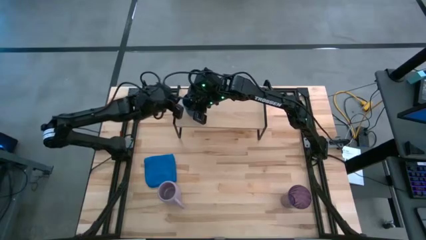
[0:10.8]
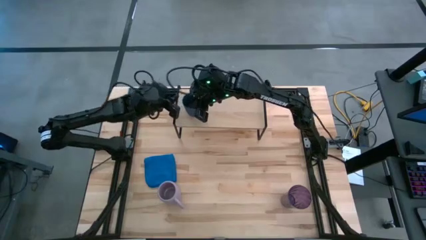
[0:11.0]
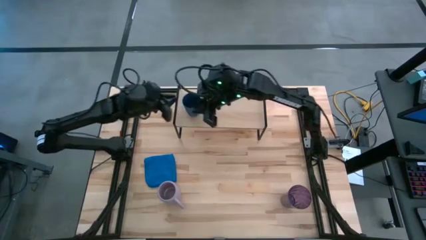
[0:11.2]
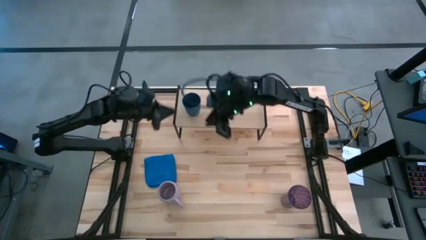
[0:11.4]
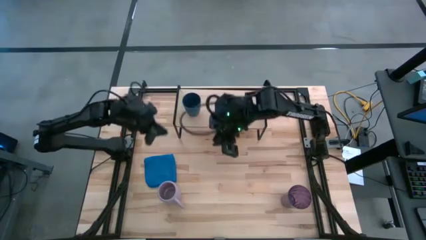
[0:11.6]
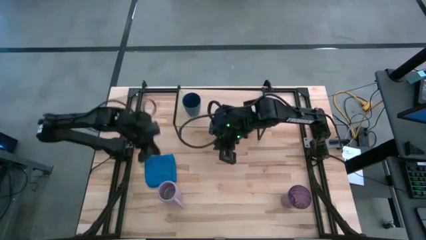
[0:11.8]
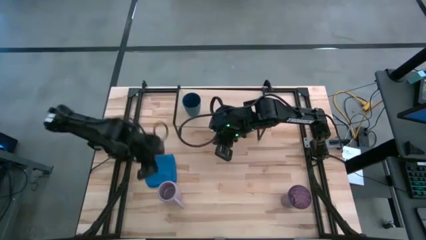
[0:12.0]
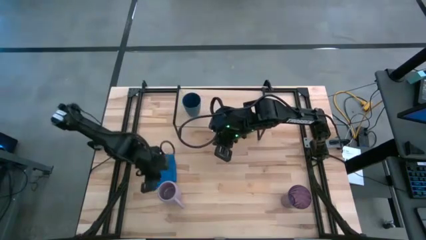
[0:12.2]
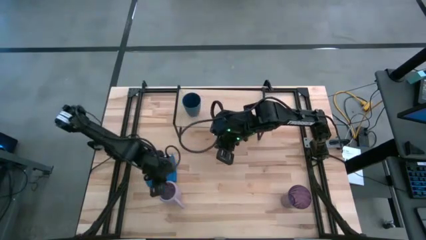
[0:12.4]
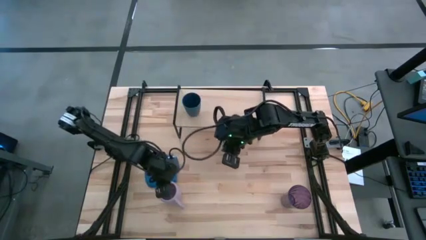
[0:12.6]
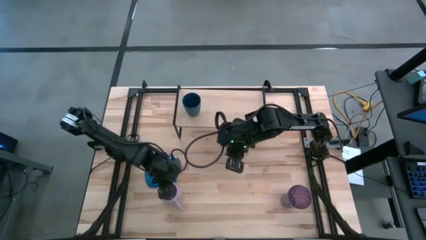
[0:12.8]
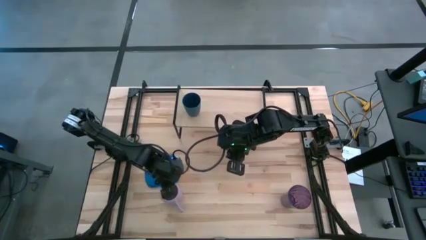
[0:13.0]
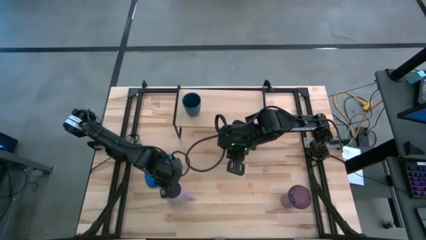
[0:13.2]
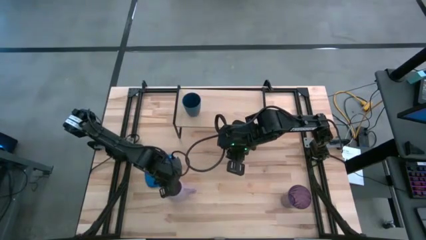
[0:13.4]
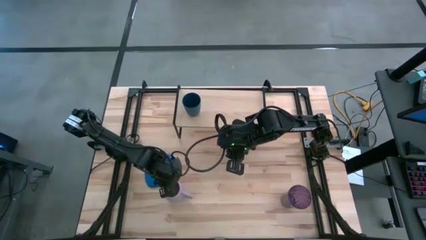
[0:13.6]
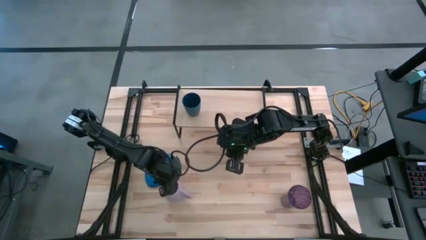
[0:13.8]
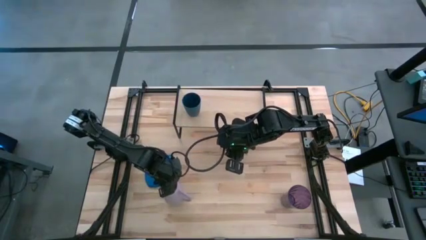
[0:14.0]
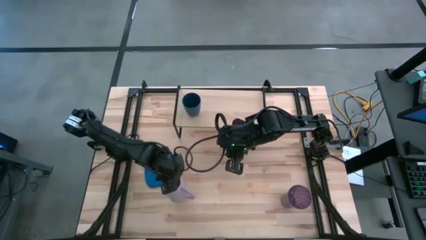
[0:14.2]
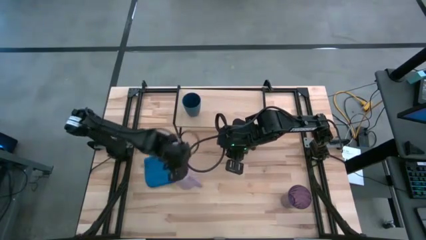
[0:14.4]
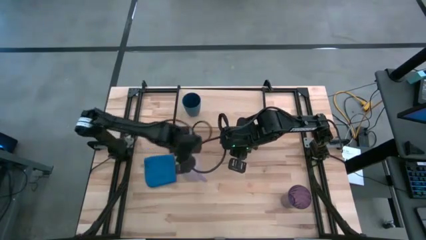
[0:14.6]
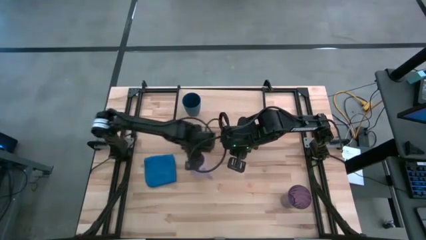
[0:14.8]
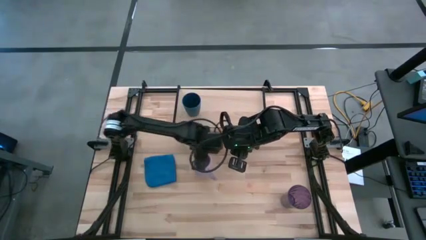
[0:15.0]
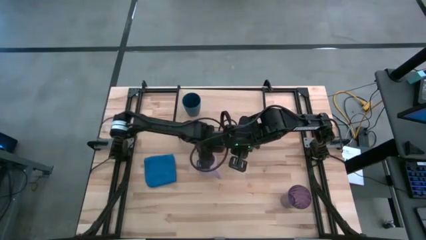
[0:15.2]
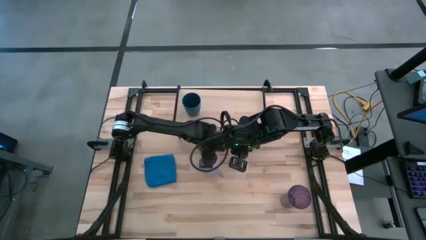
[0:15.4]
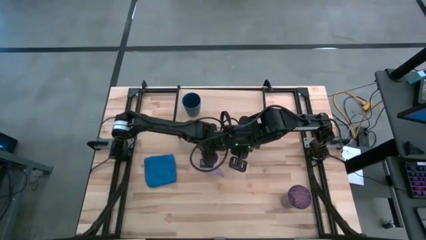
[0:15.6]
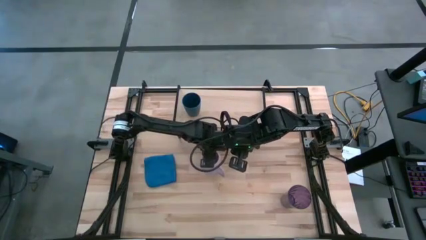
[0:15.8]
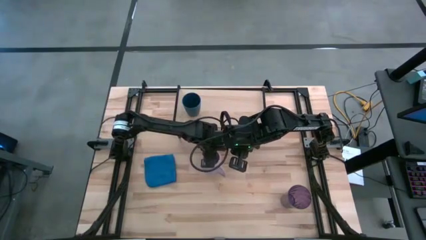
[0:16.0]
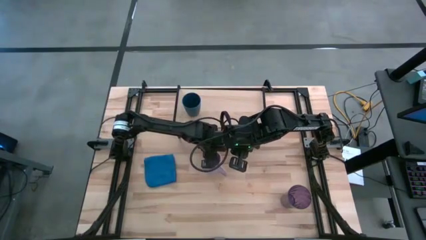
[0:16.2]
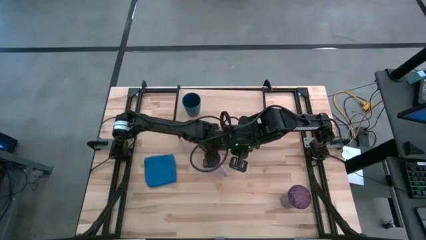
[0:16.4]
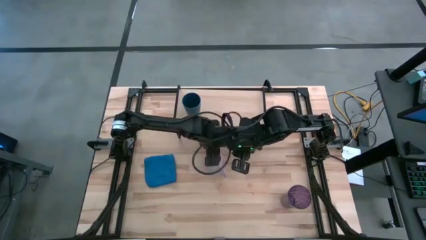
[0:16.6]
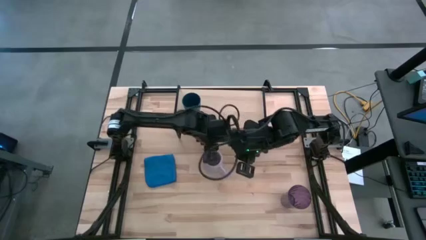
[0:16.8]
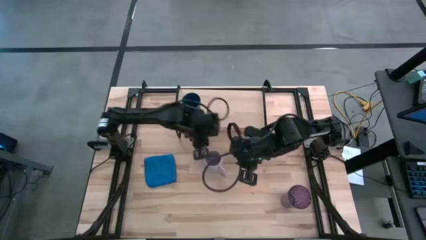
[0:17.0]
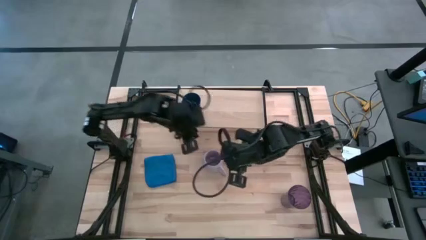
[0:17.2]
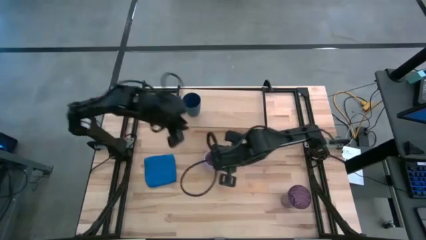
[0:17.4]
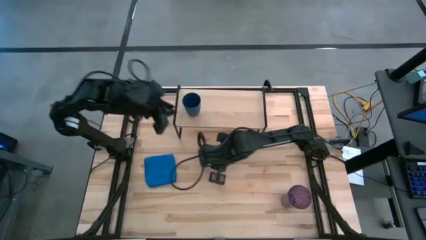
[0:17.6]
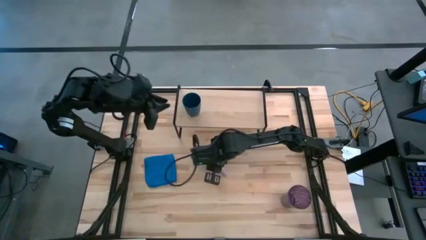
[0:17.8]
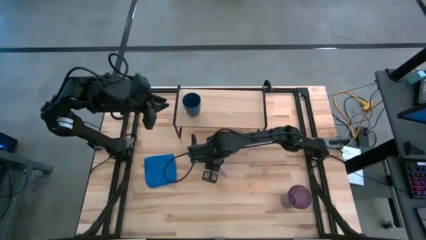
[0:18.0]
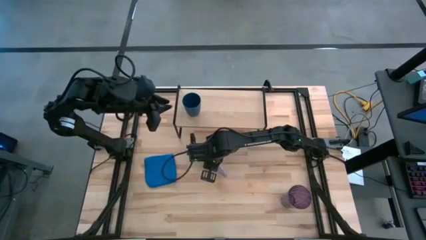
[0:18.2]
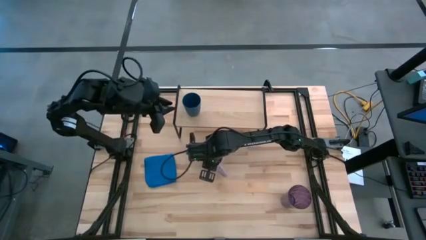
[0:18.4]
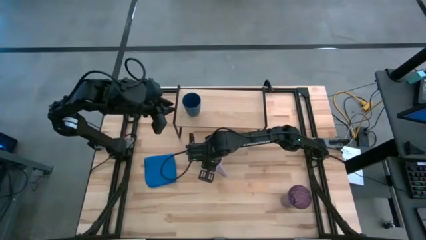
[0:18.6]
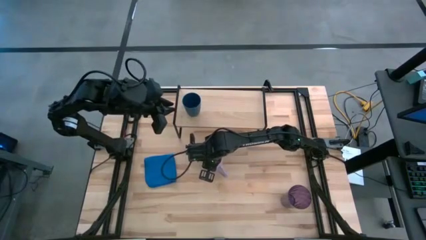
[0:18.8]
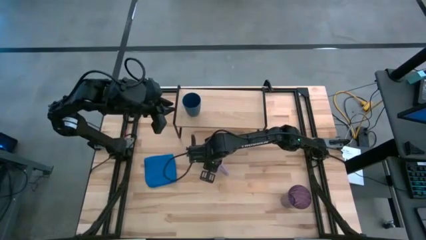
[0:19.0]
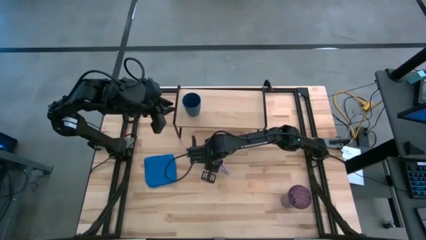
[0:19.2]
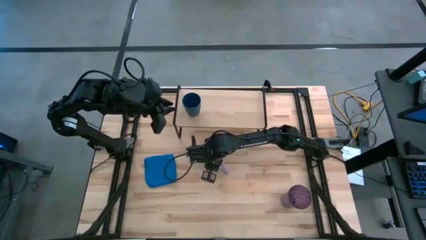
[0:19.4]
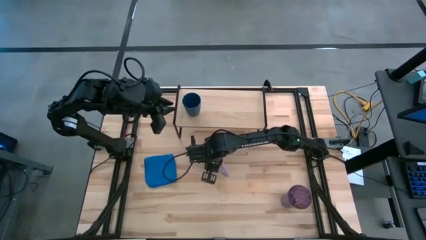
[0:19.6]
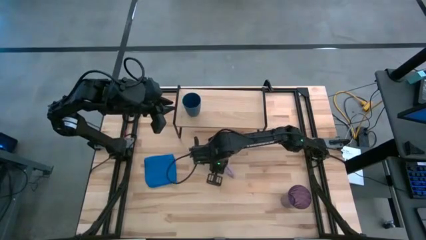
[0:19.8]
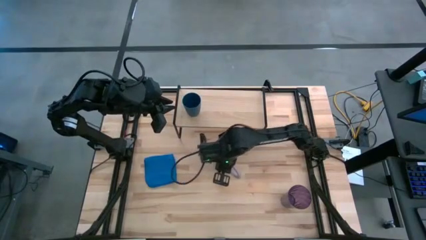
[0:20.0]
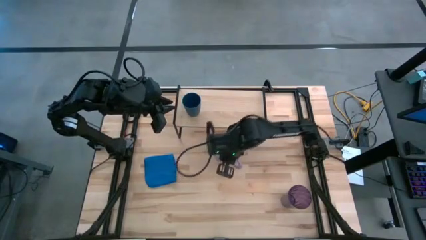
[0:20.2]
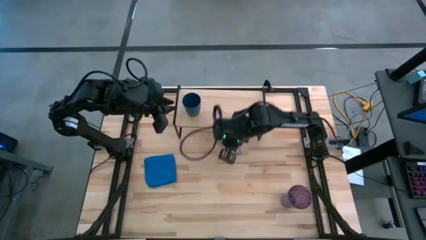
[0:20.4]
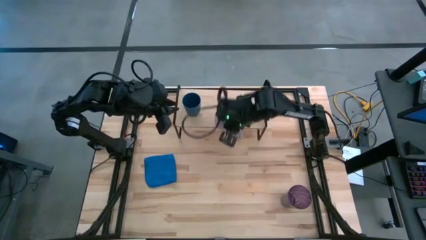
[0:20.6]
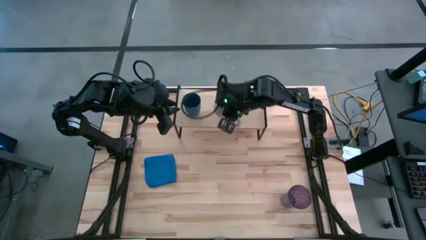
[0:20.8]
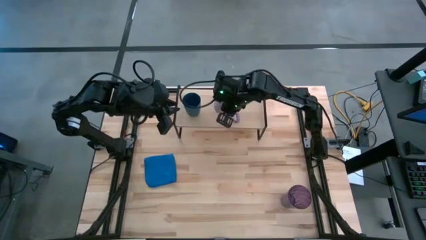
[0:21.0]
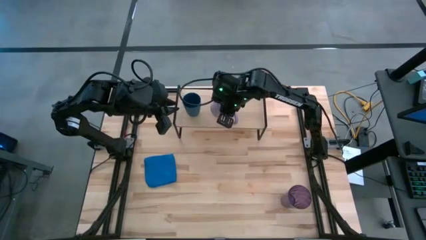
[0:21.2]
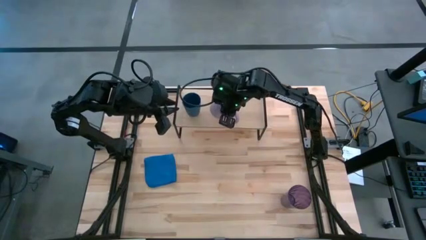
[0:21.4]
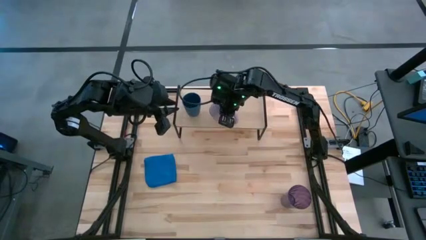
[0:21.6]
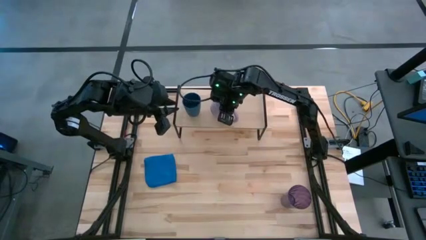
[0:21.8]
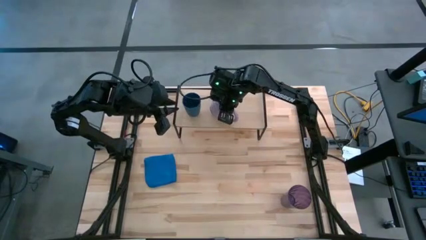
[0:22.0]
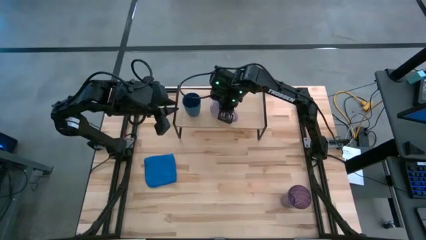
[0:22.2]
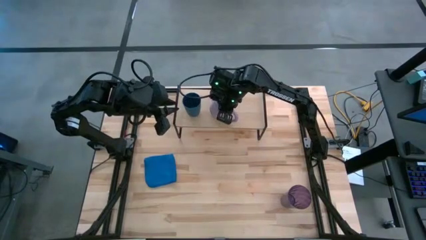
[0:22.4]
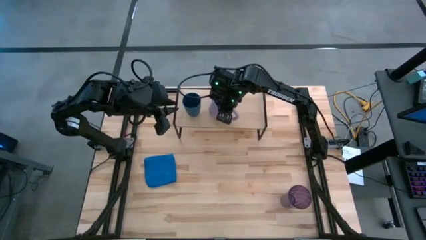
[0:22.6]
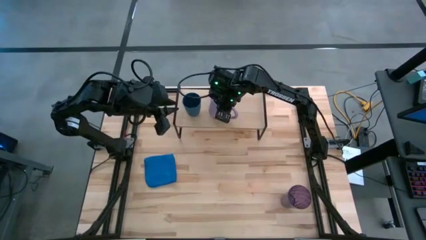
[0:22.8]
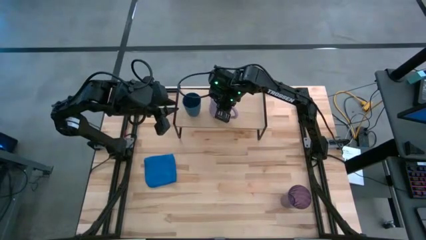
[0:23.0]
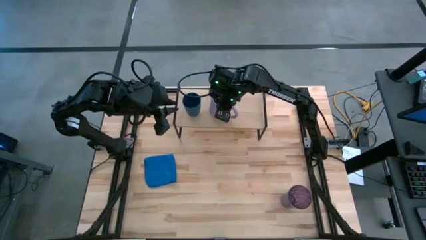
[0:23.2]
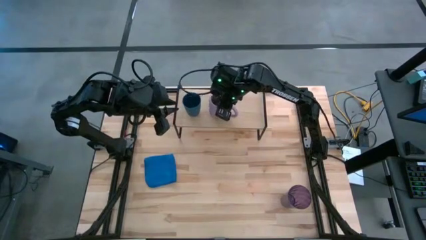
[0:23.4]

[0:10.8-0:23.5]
Task: Stack small to large cups/mugs on shelf
Put the light purple mug on the shelf

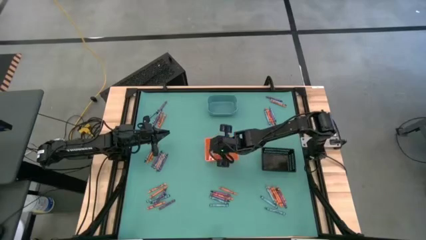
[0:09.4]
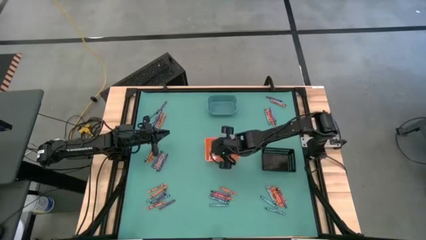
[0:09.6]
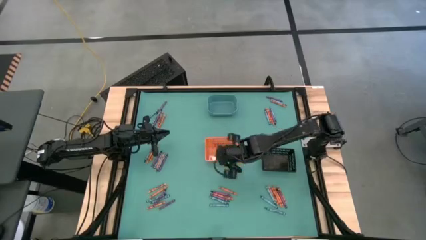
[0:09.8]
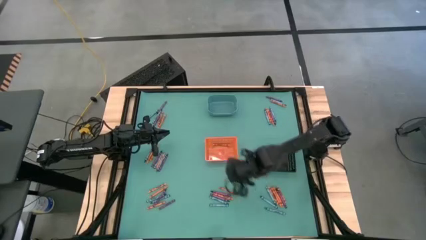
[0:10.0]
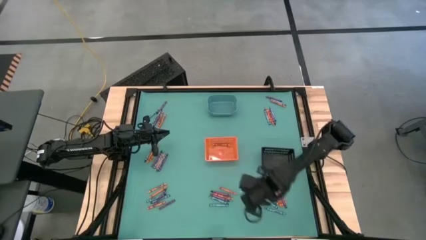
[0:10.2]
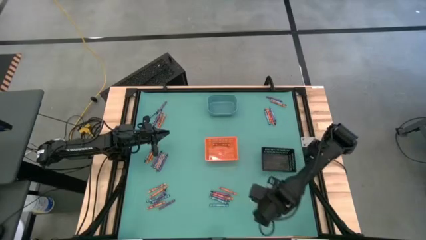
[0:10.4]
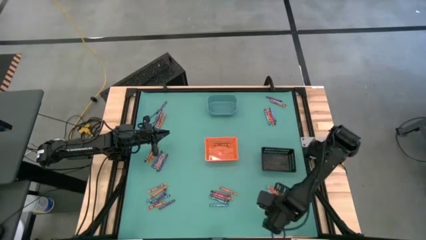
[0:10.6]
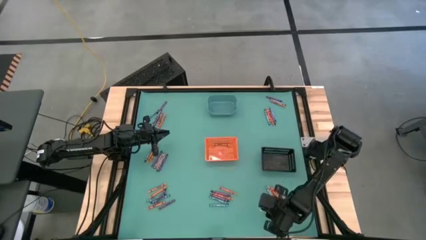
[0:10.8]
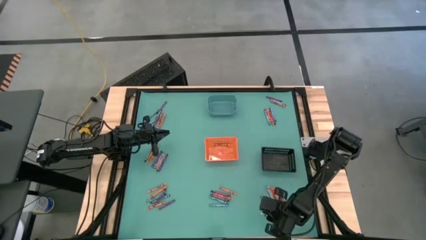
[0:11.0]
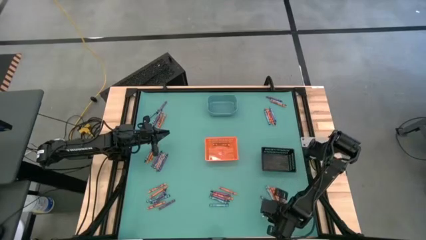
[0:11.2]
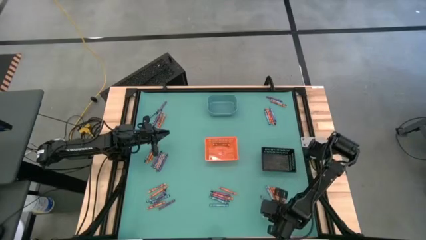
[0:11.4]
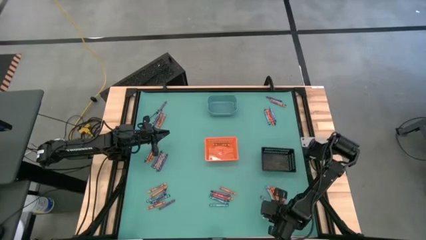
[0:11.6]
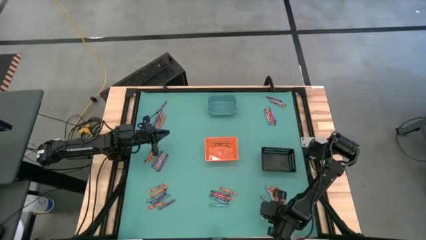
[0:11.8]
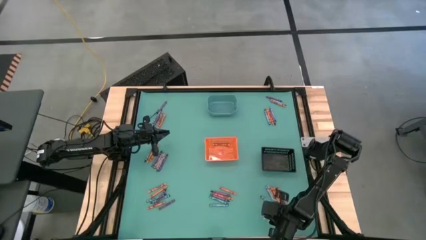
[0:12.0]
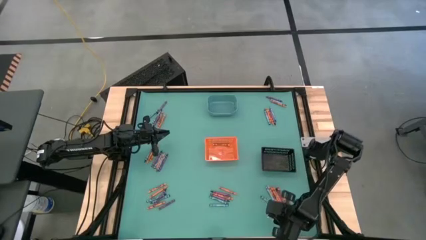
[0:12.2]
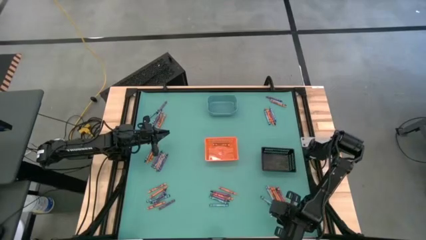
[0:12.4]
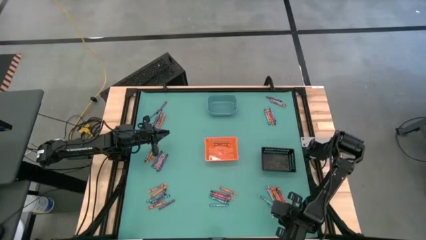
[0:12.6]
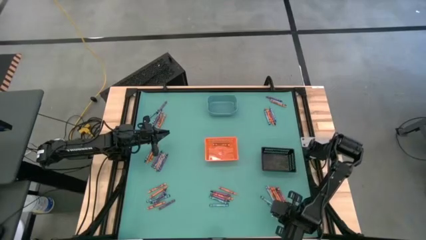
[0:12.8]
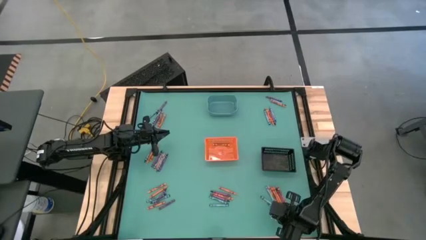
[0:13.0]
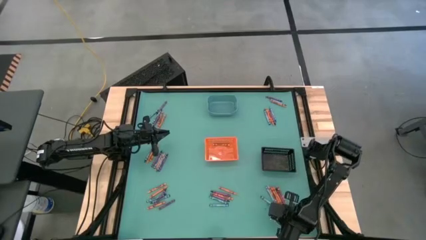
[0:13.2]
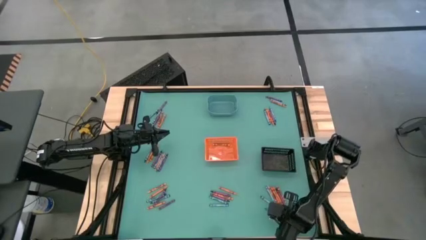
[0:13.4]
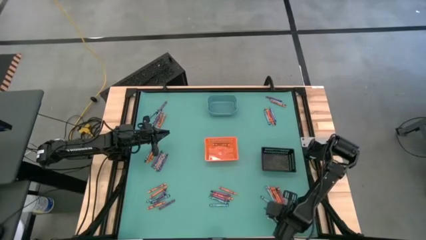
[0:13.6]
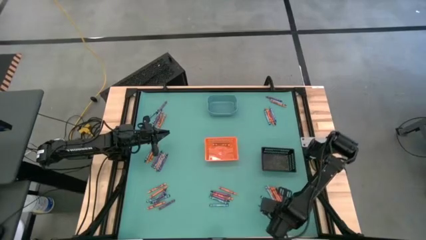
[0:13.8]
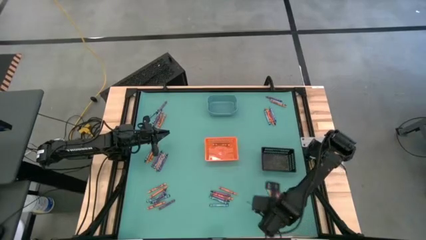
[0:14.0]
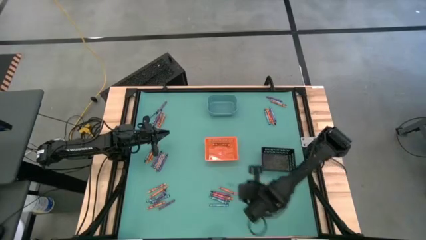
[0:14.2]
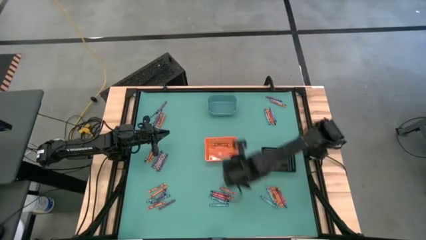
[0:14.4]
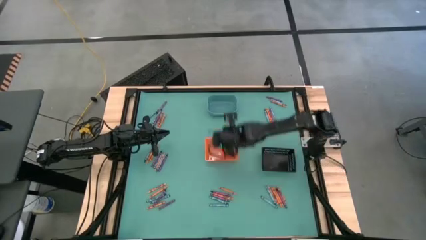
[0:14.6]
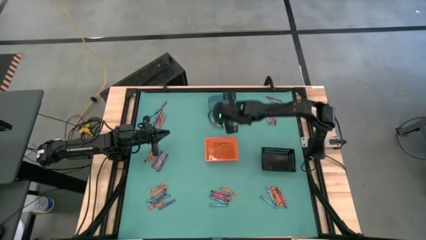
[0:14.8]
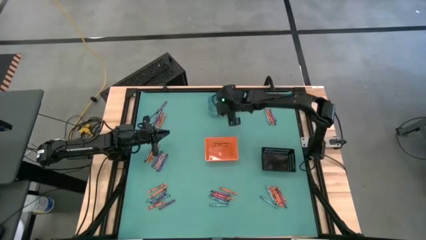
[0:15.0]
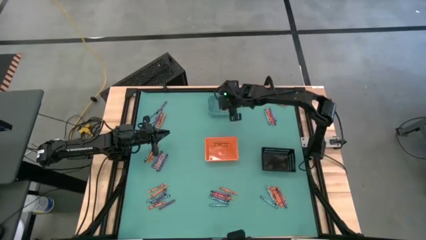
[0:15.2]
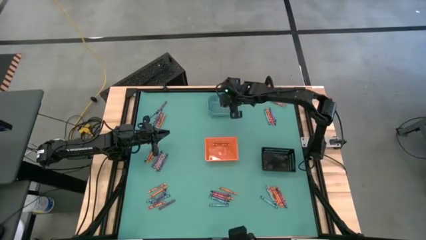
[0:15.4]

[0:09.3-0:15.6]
Task: Sort crayons
Put the green crayon into the blue bin
